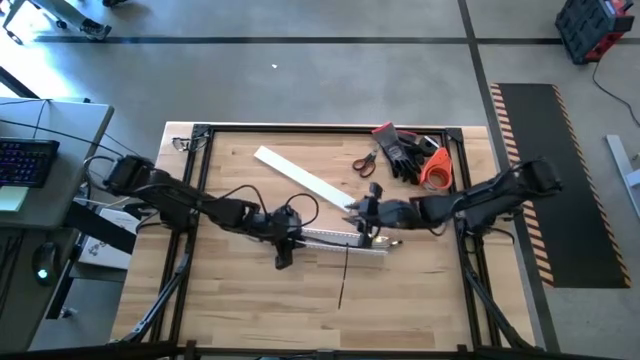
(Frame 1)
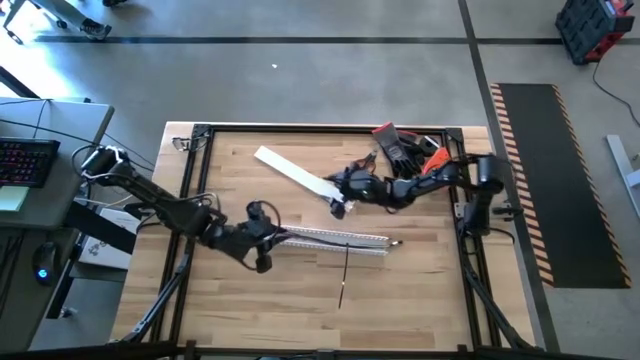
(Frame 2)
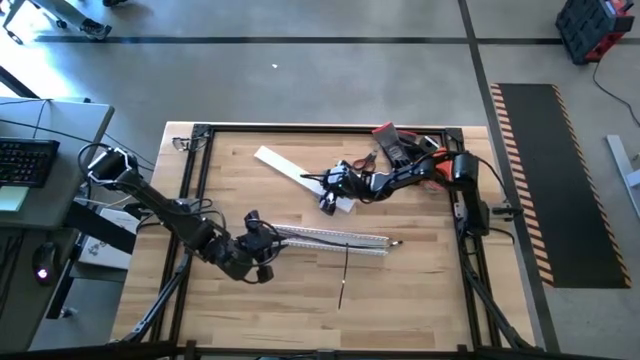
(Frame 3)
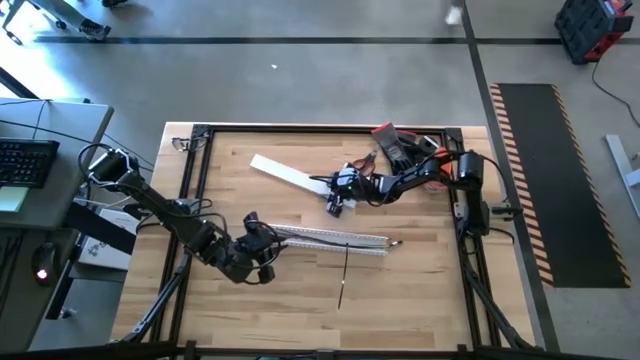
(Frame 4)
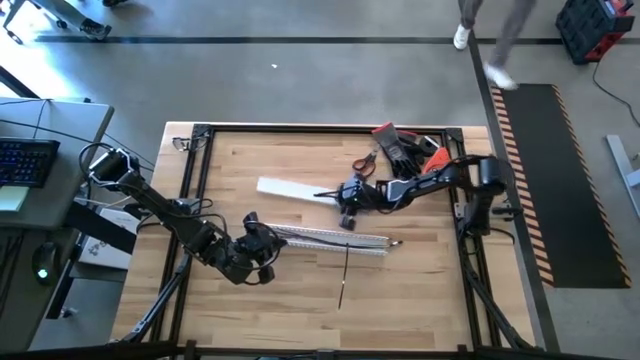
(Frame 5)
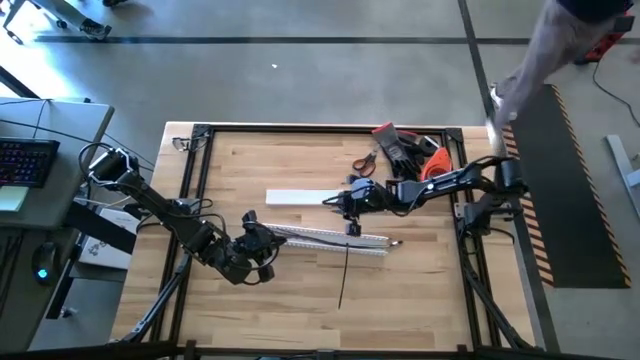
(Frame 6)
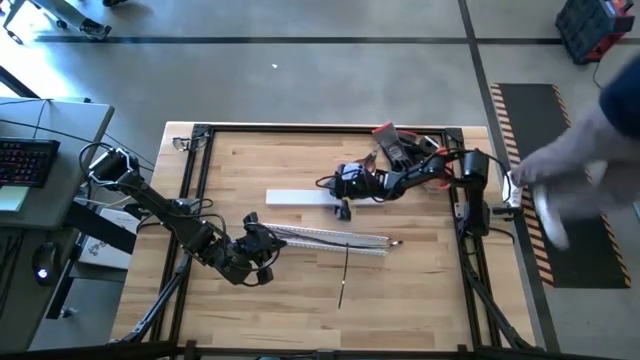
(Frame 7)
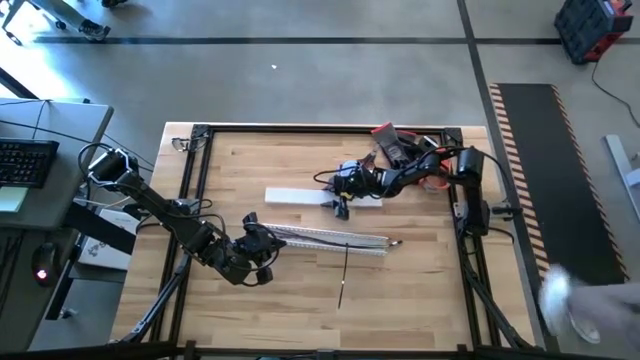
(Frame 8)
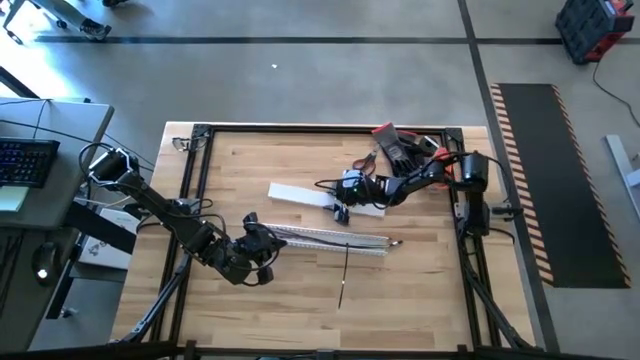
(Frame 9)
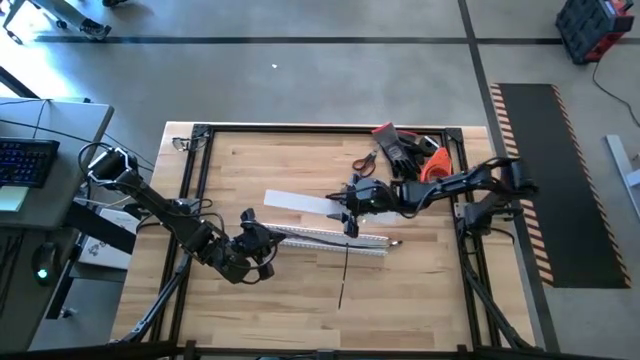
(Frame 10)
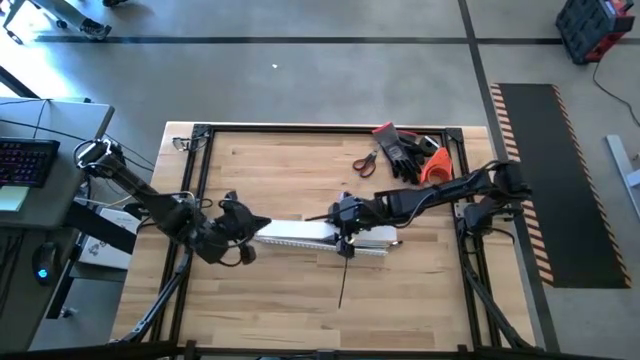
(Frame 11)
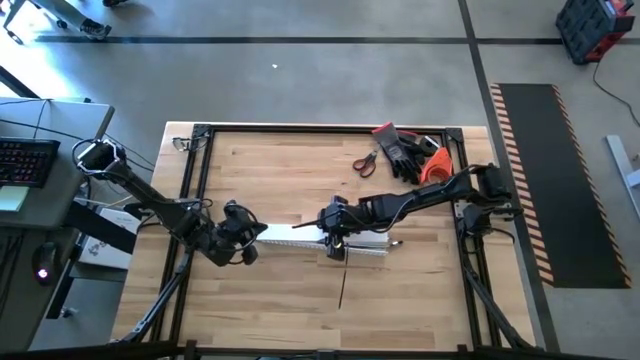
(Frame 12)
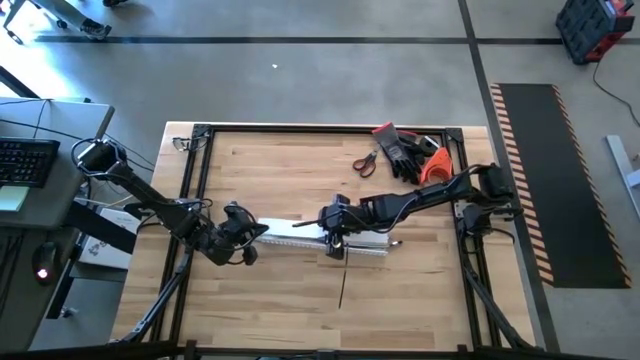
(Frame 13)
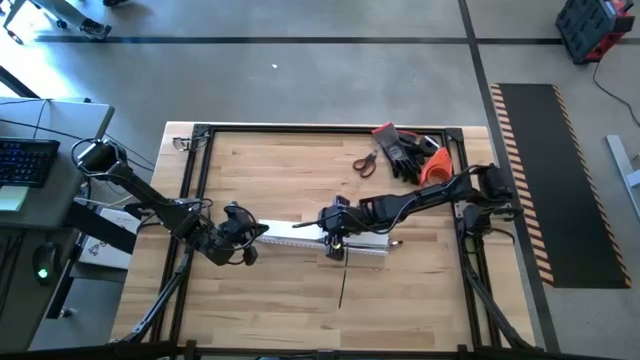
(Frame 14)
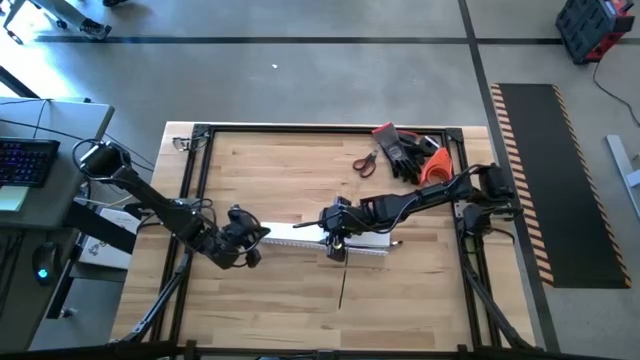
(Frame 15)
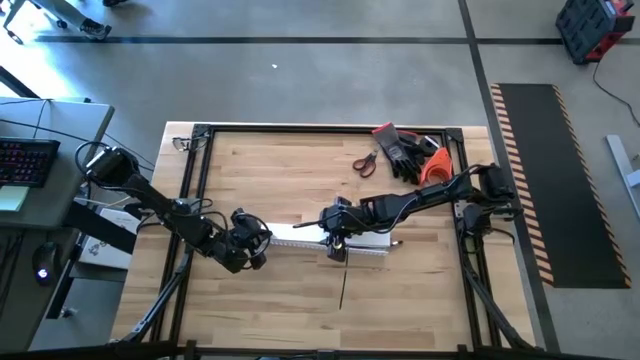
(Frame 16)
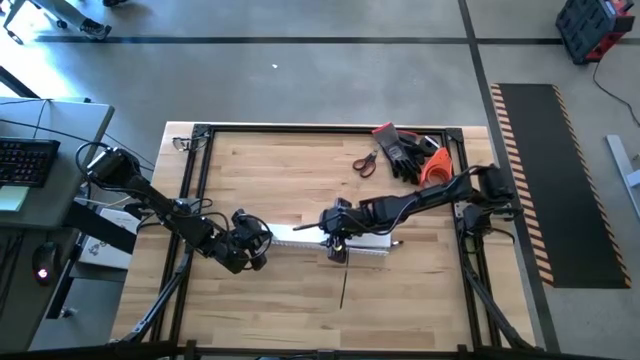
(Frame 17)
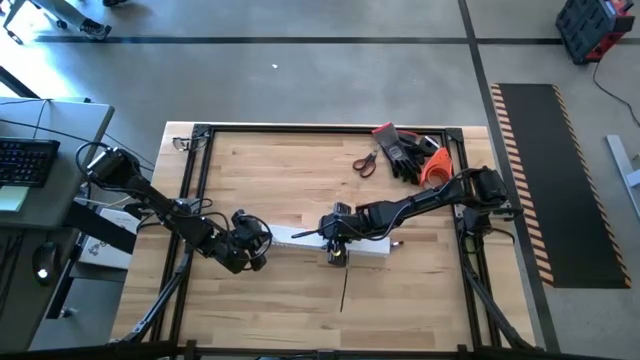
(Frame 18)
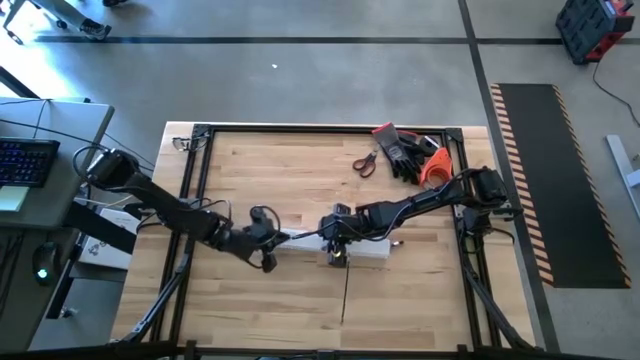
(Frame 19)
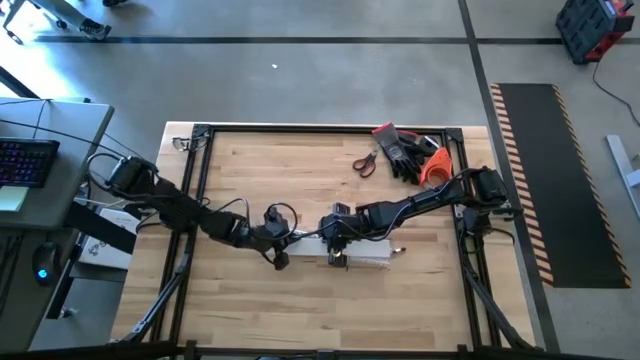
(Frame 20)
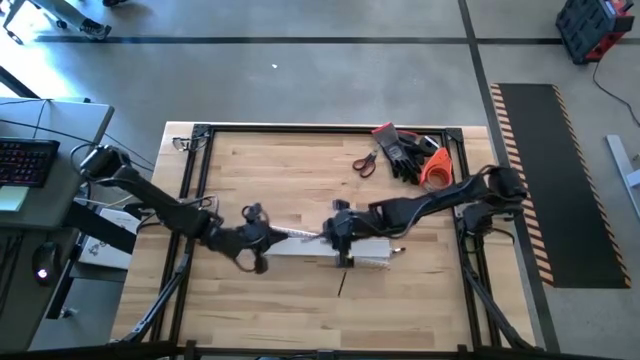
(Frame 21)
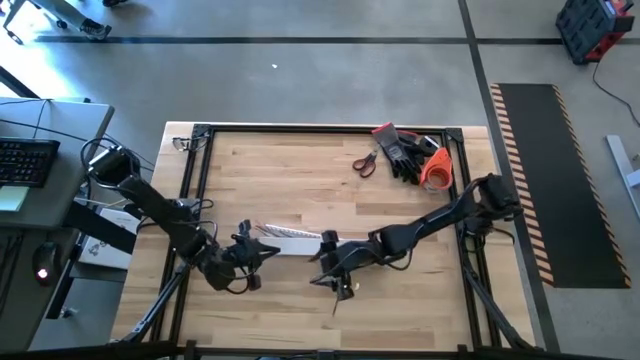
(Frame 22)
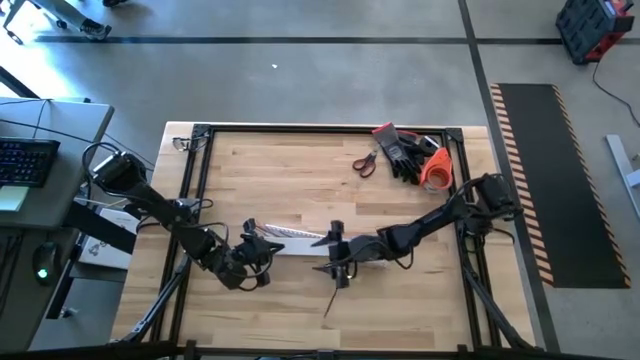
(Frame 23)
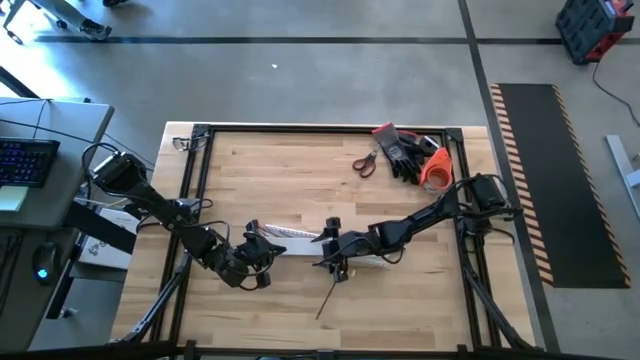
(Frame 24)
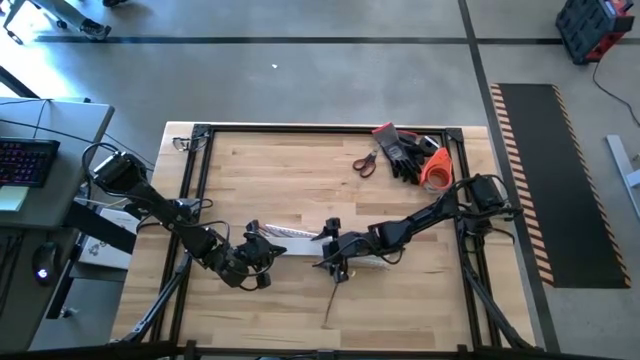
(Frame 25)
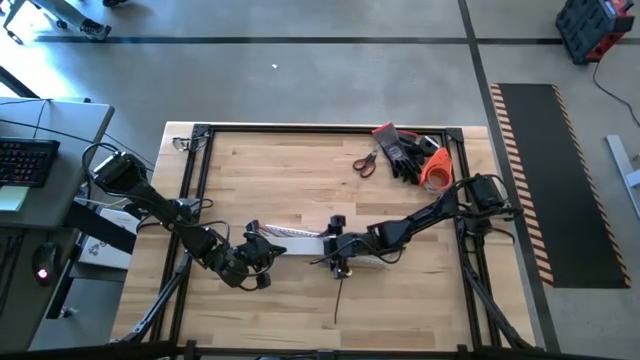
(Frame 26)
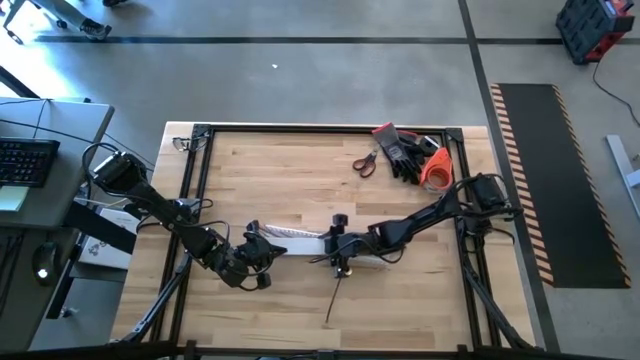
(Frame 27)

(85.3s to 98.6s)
Task: Ziptie cables
Close the cable duct lid

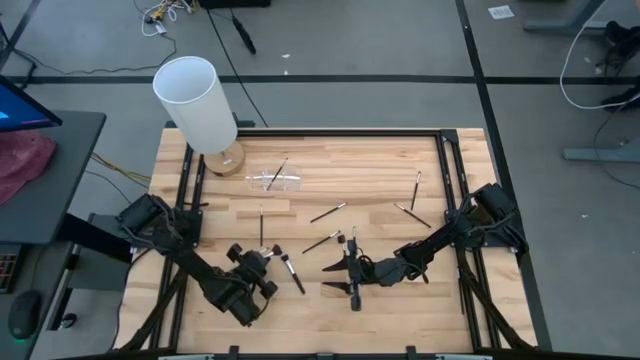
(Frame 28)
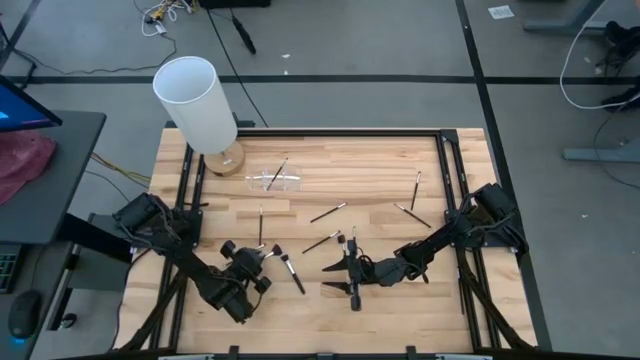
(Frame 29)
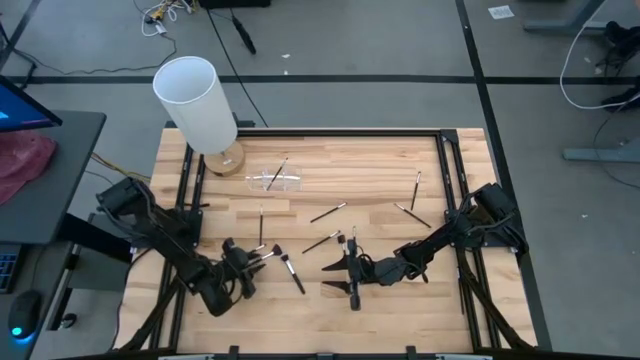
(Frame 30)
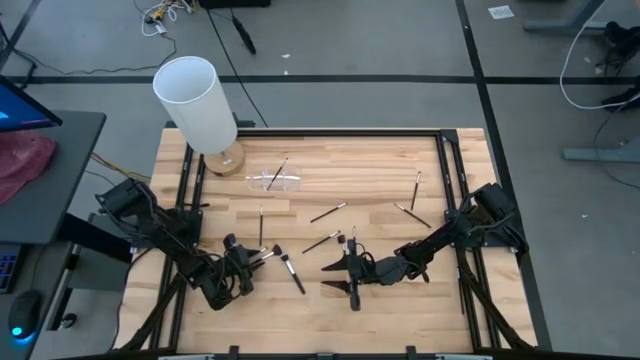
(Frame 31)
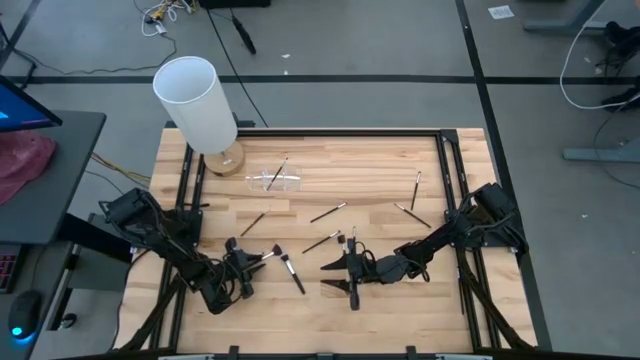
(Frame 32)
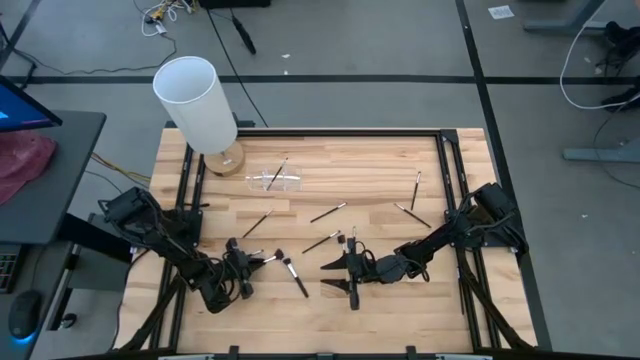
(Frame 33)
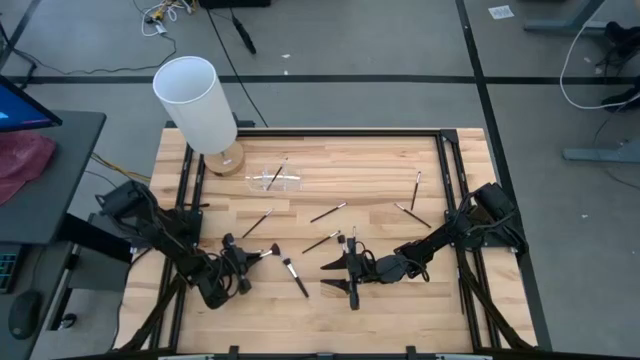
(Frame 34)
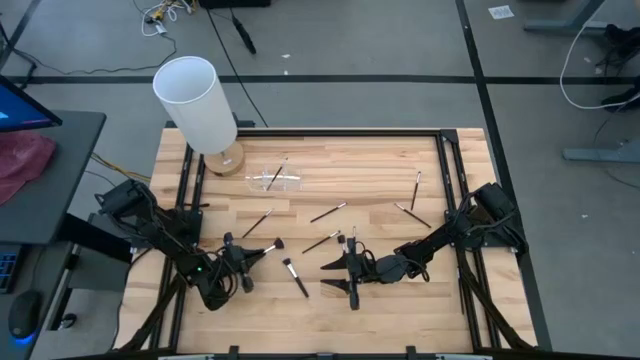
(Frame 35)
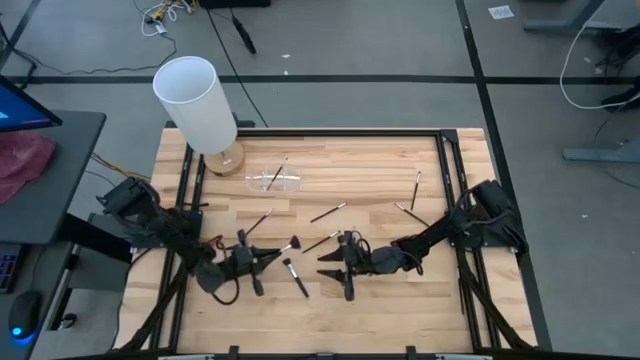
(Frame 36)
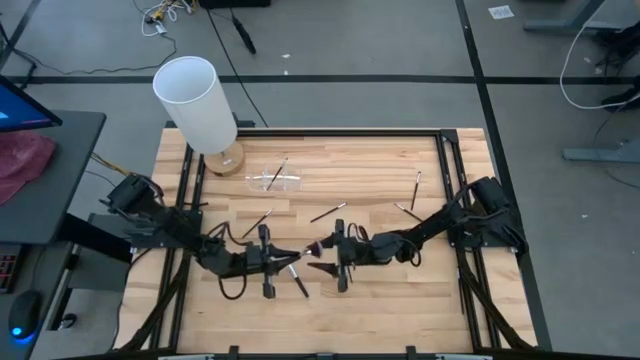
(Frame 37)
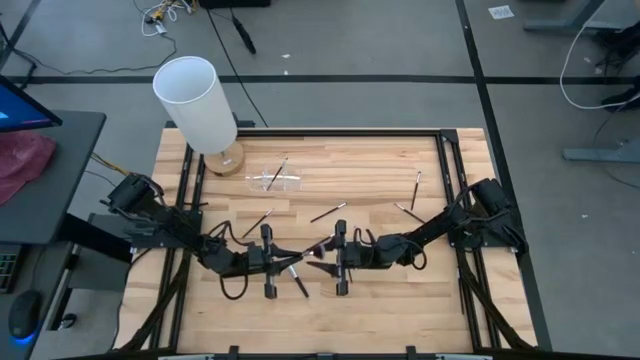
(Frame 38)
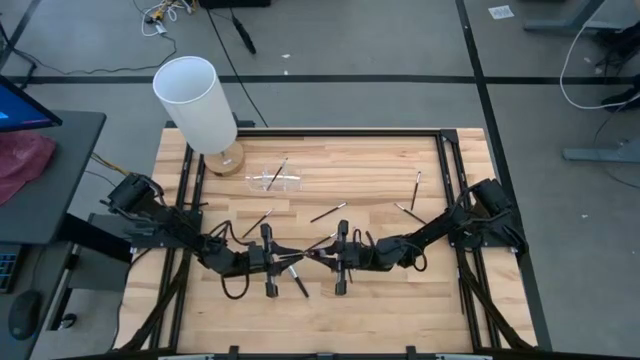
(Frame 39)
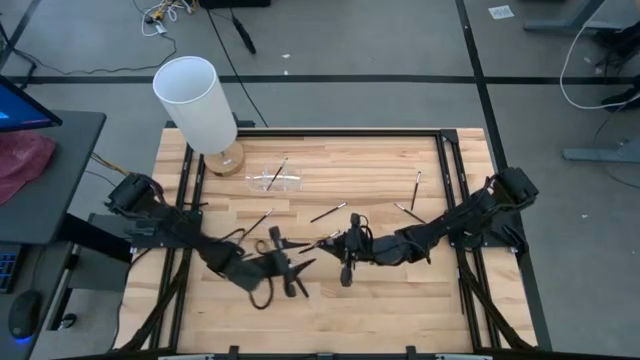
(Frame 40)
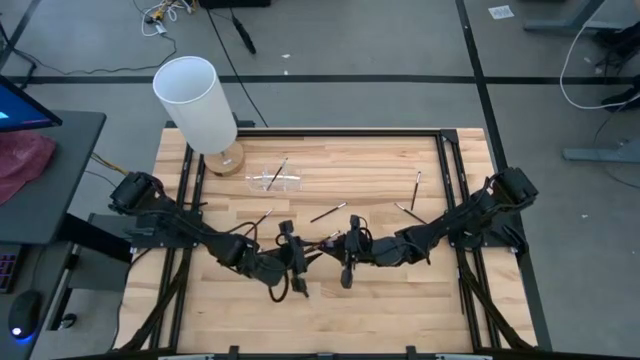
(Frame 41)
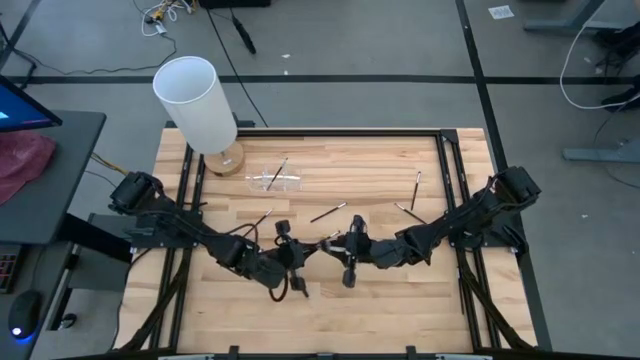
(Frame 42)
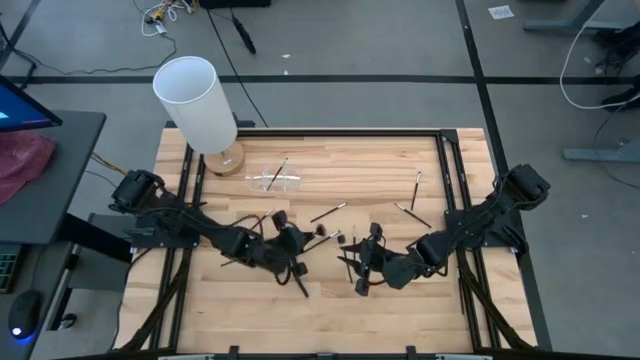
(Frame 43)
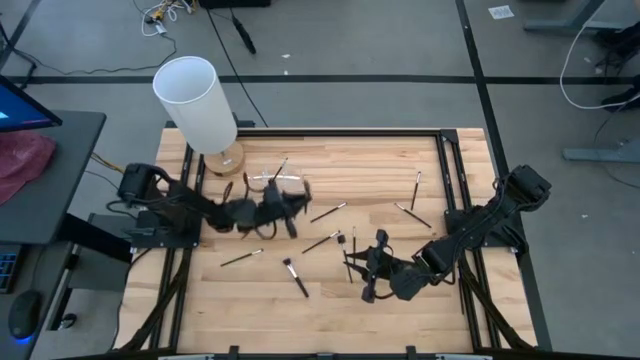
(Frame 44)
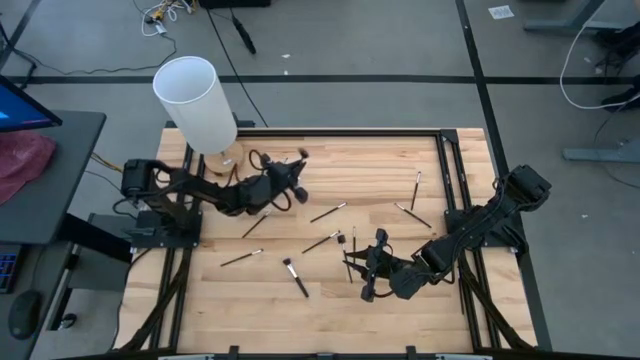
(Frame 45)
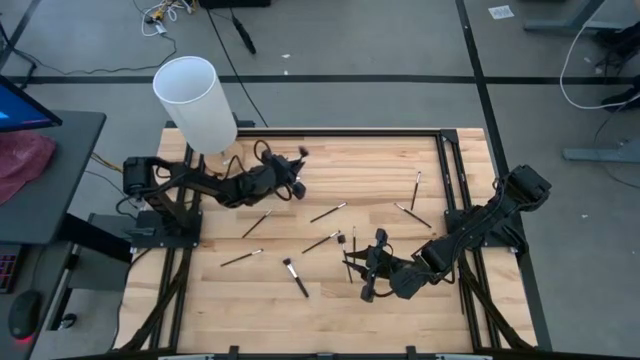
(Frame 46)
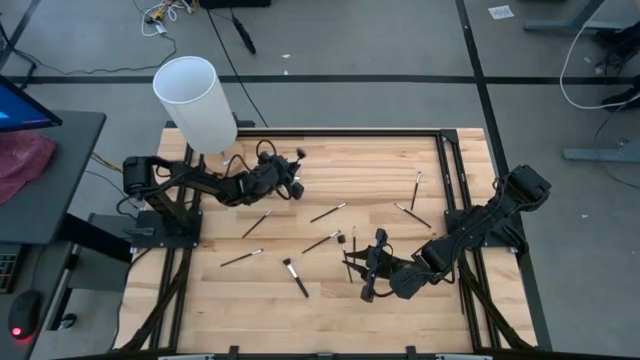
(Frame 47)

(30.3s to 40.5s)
Task: Put items in baskets/containers
Put the highlighter brush into the transparent organizer
